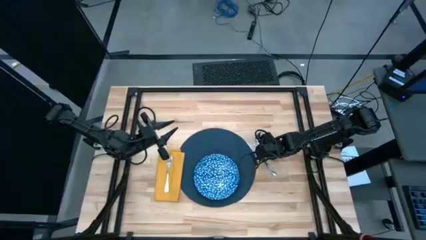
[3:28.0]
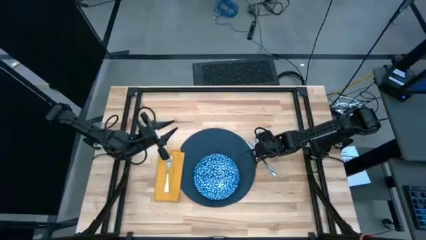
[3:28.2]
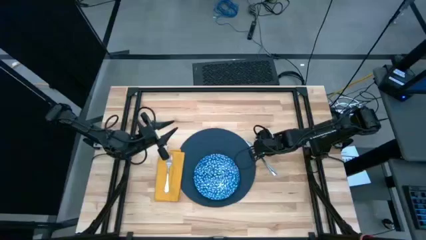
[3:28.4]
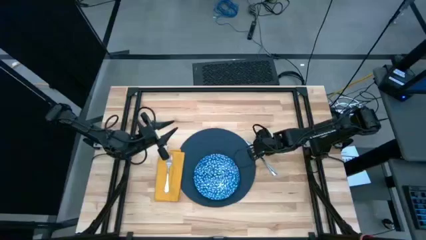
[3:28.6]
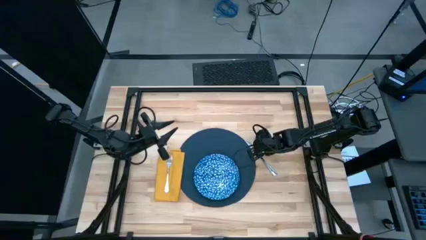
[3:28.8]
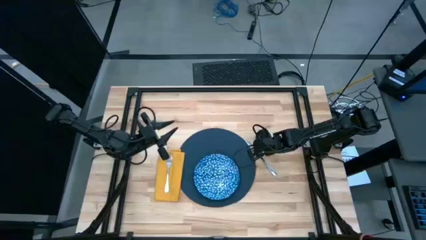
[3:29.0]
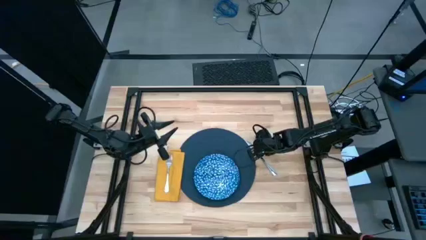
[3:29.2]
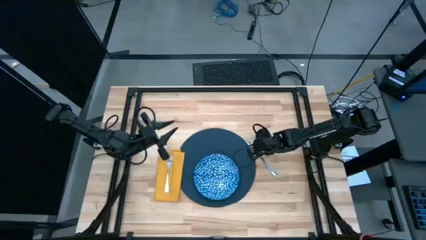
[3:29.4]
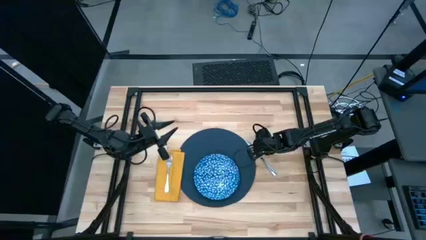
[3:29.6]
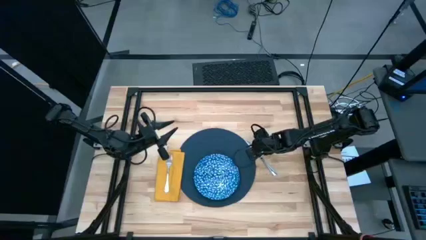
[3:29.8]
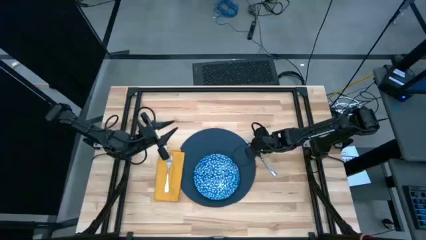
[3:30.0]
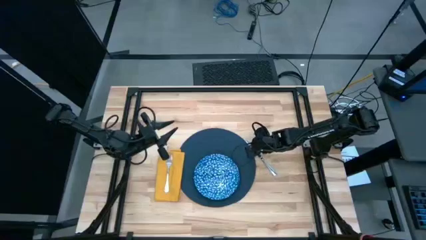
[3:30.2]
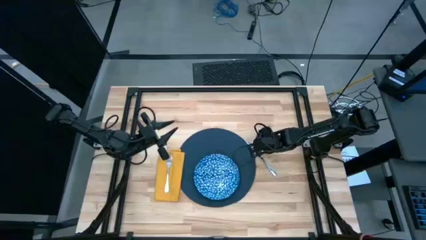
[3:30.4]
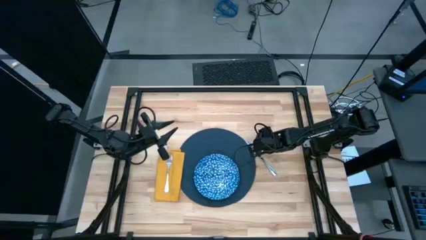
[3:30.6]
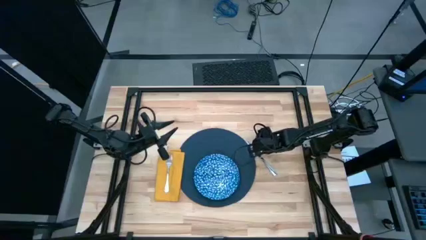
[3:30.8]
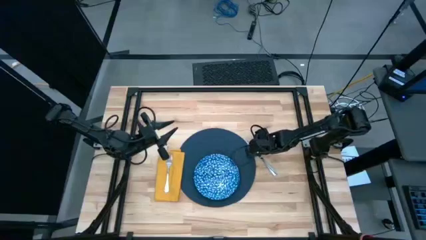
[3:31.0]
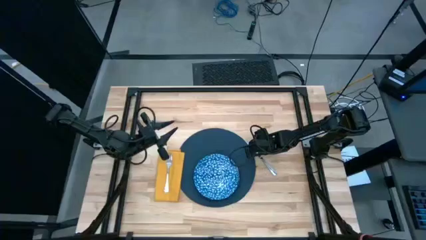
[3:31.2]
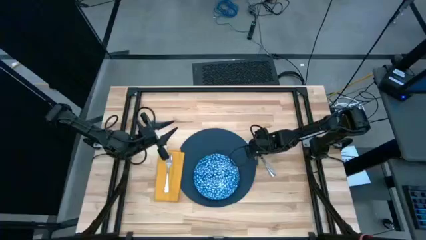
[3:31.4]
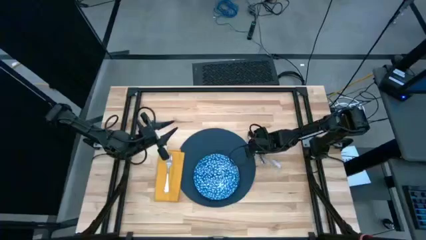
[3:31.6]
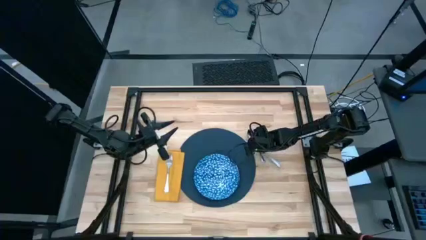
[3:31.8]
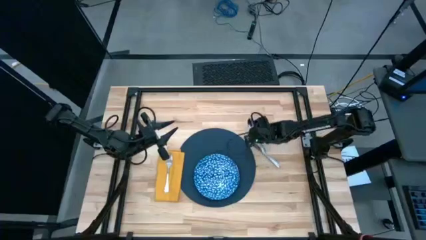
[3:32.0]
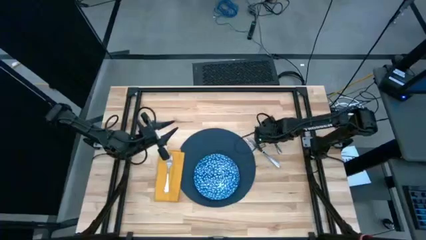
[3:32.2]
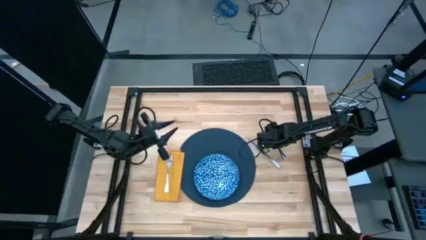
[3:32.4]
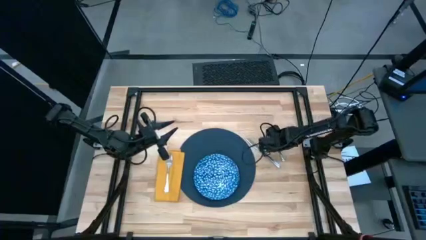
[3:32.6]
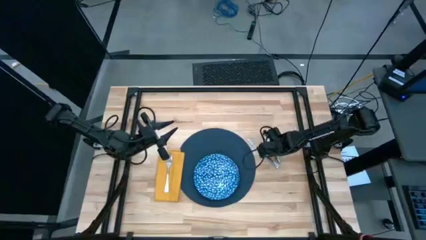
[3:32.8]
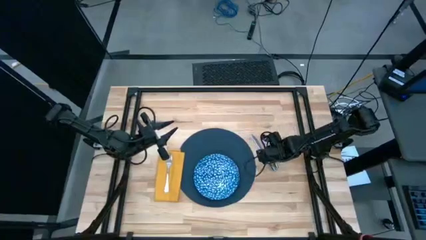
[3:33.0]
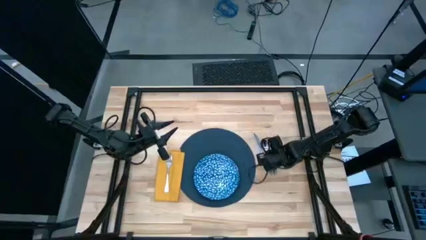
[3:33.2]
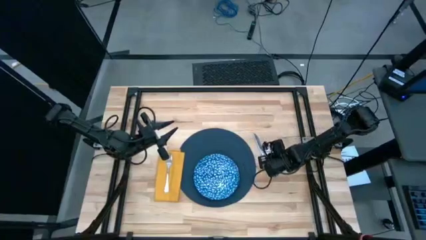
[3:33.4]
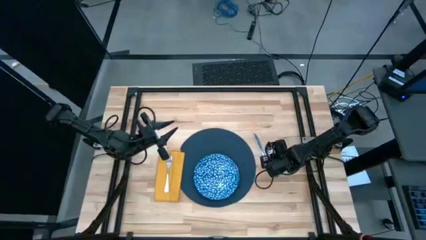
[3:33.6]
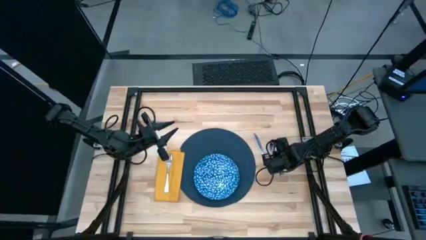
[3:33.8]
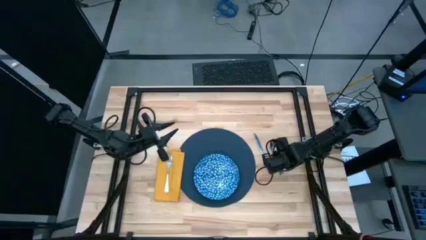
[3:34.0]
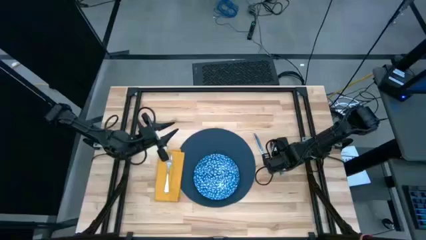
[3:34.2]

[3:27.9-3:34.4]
Task: Set table place
Put the spoon to the left of the table knife

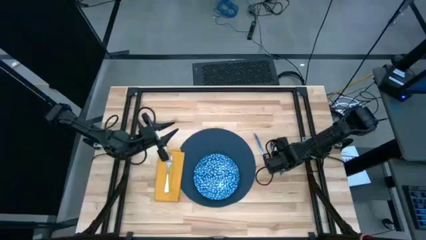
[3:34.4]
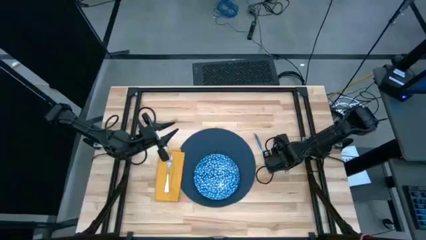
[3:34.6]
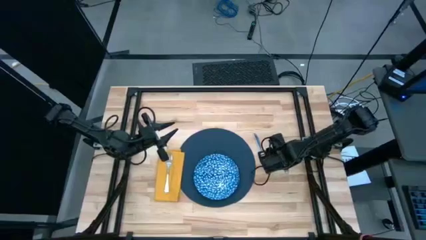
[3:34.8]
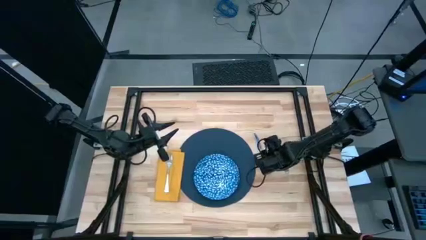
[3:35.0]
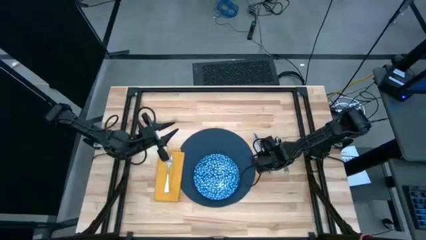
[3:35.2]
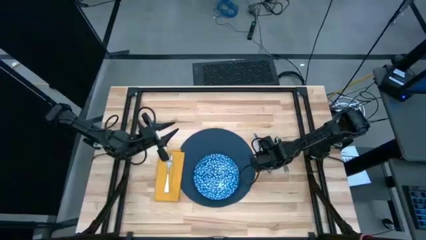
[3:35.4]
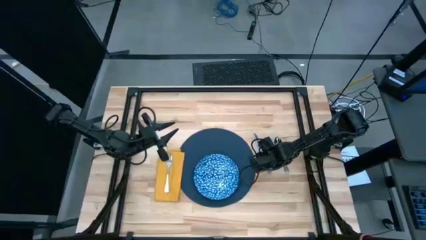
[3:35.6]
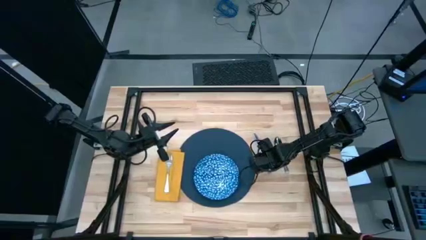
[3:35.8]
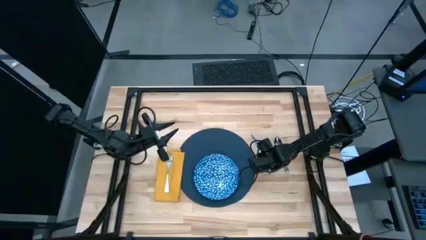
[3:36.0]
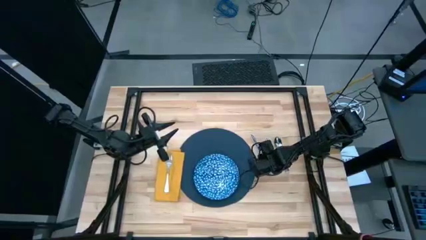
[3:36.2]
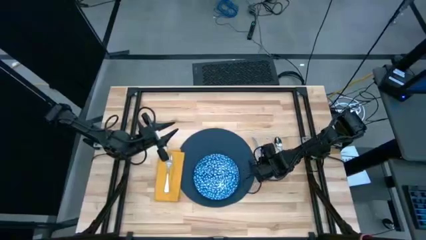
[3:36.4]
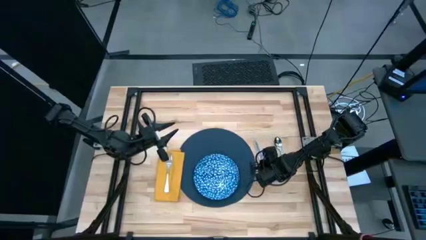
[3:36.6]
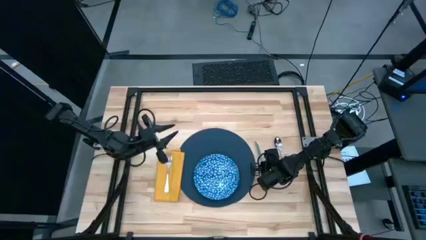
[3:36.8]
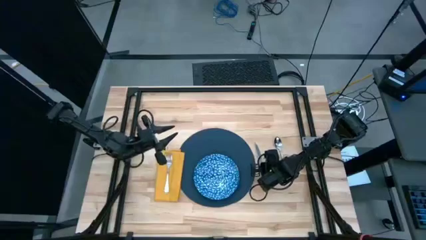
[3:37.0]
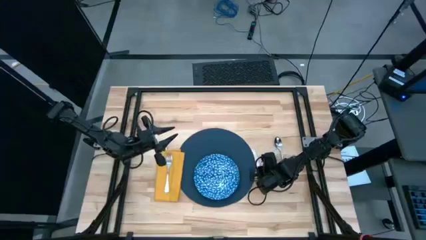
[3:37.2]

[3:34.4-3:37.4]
Adjust the table knife

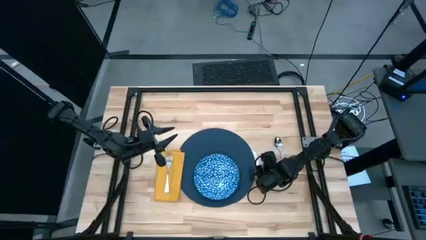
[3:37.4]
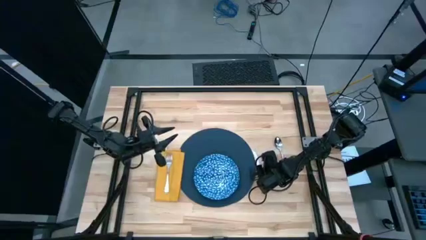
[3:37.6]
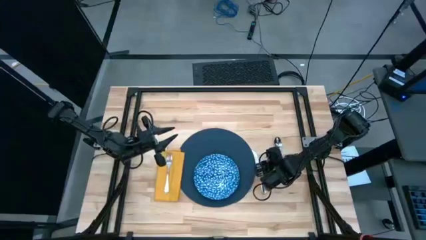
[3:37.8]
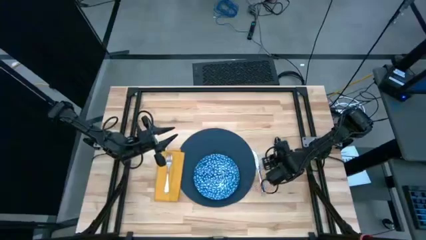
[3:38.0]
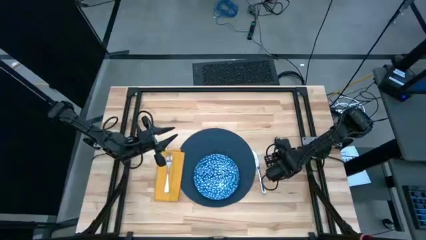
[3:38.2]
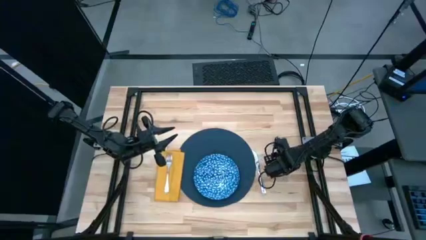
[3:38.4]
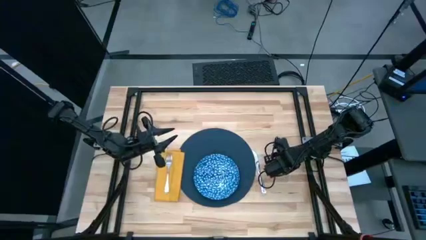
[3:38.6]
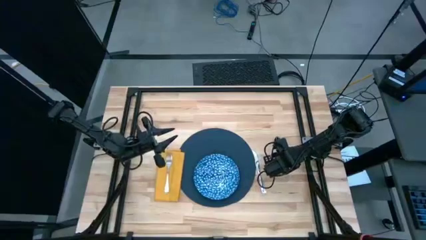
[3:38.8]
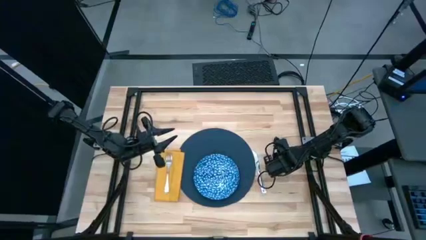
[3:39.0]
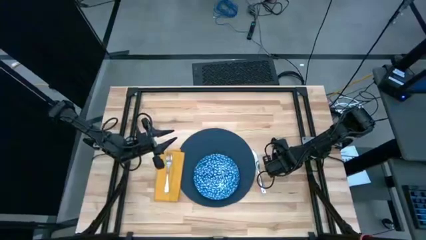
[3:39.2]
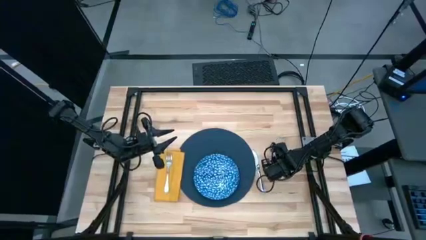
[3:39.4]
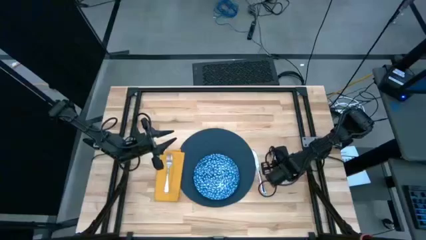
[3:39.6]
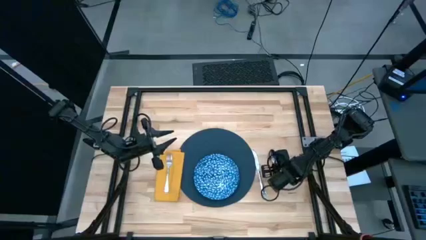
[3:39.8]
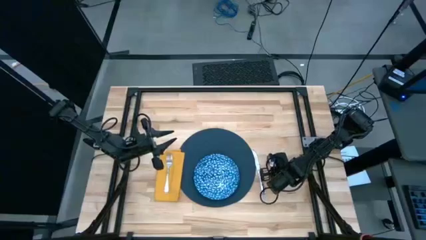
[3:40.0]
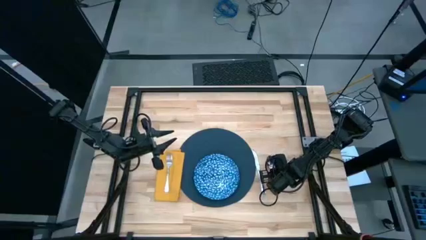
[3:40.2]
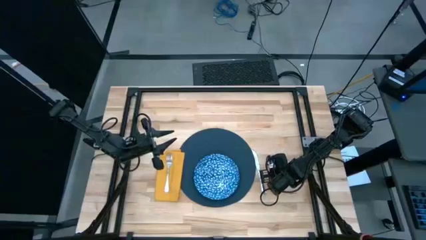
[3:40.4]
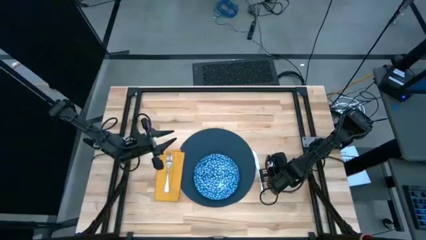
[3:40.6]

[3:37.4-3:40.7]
Adjust the spoon
